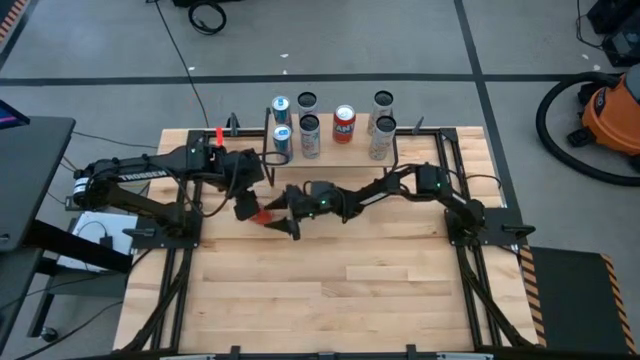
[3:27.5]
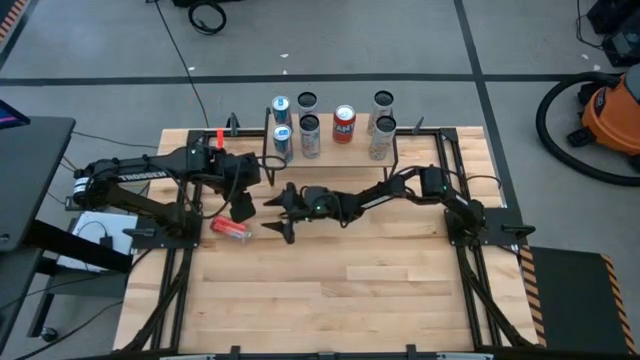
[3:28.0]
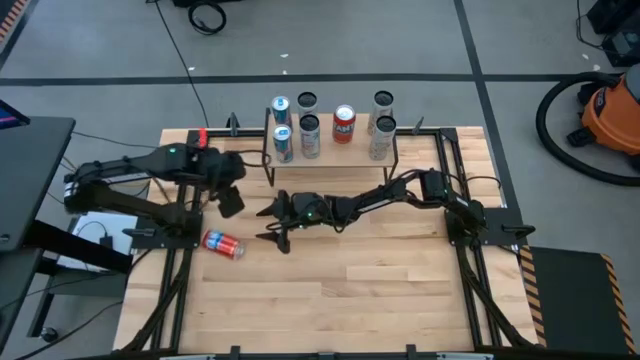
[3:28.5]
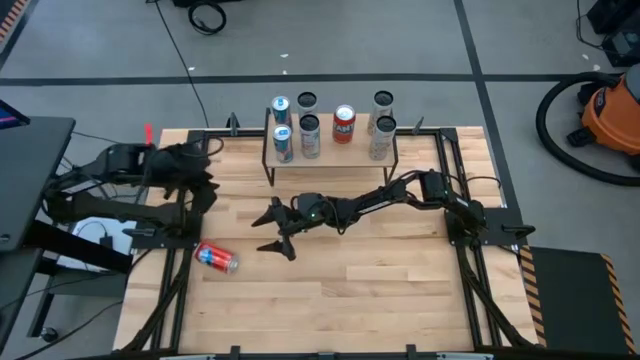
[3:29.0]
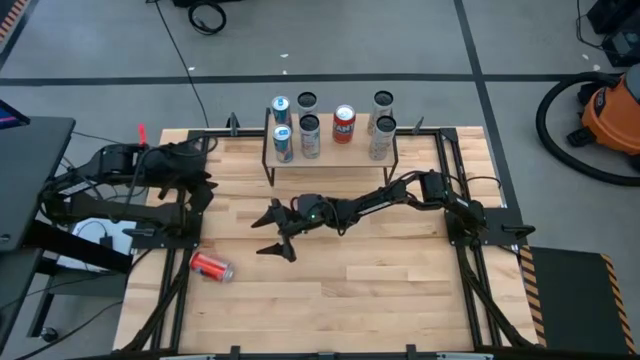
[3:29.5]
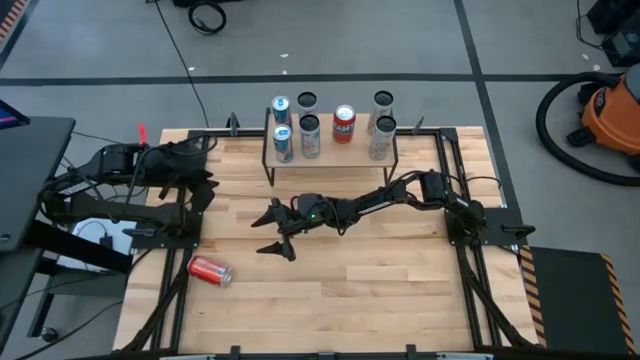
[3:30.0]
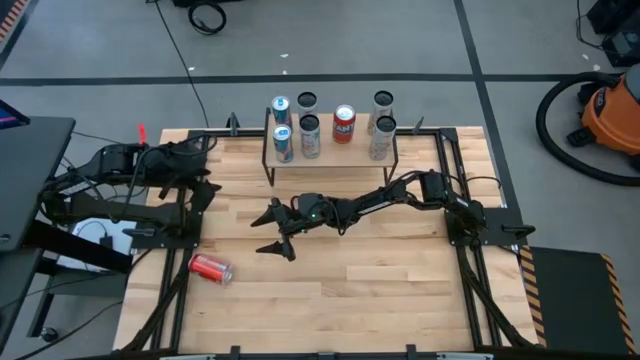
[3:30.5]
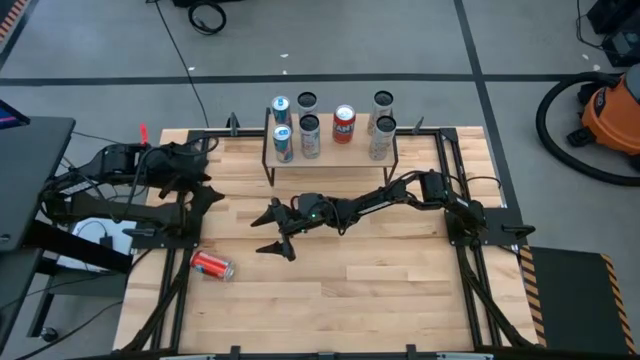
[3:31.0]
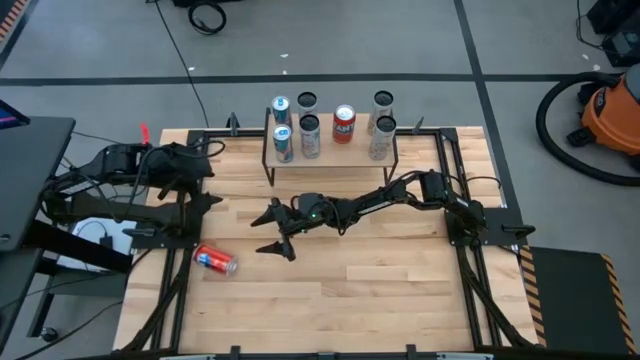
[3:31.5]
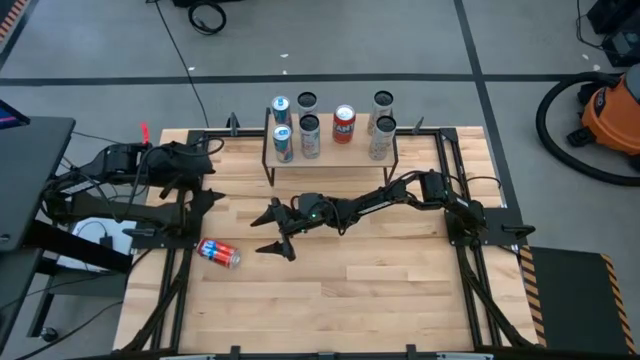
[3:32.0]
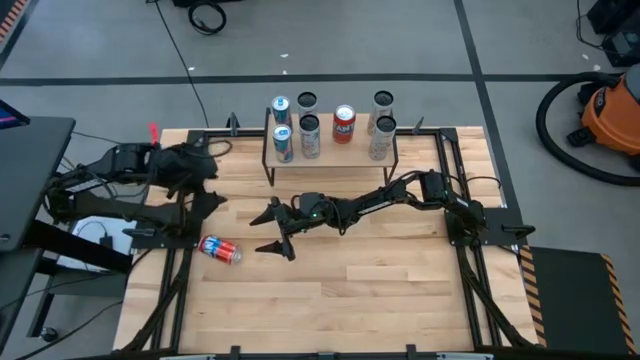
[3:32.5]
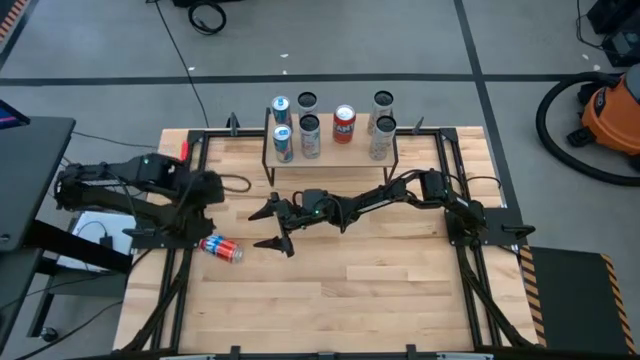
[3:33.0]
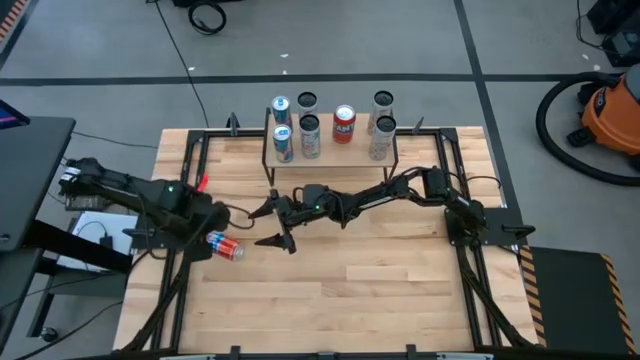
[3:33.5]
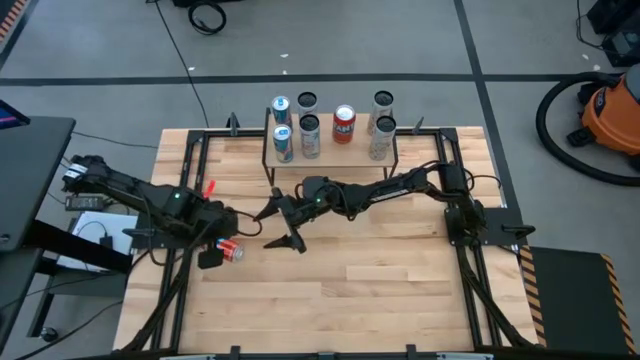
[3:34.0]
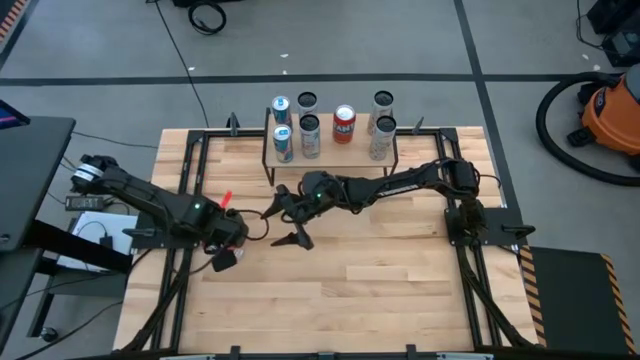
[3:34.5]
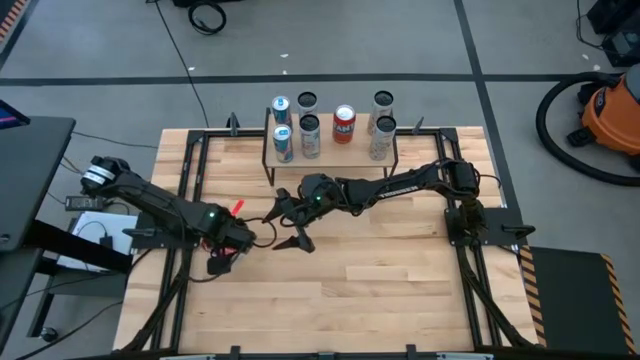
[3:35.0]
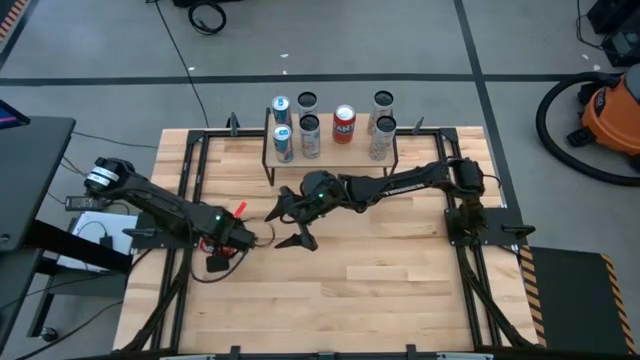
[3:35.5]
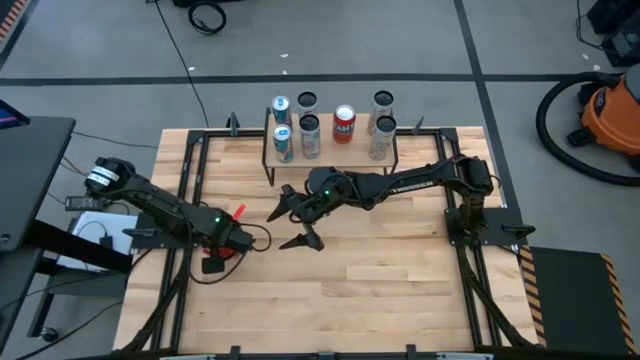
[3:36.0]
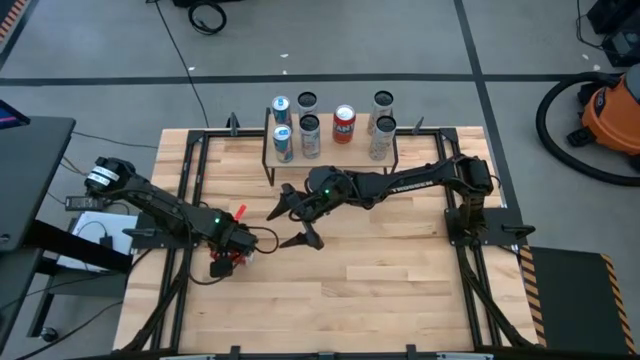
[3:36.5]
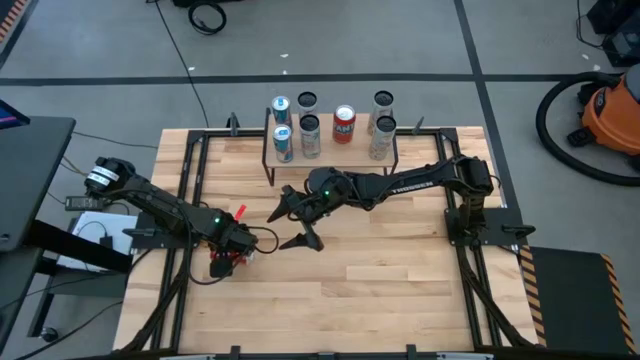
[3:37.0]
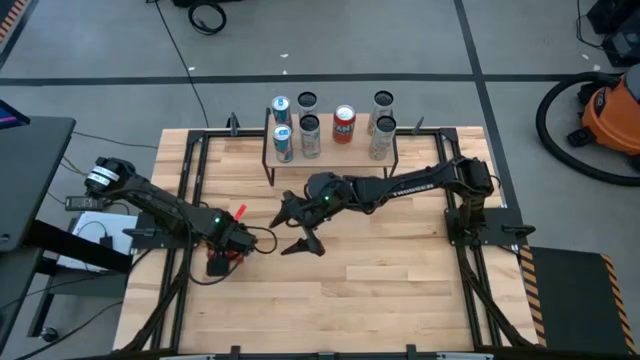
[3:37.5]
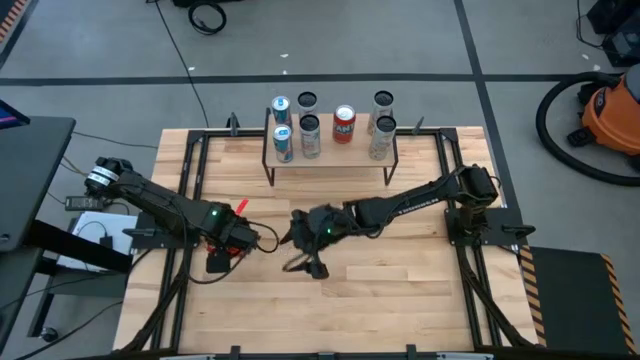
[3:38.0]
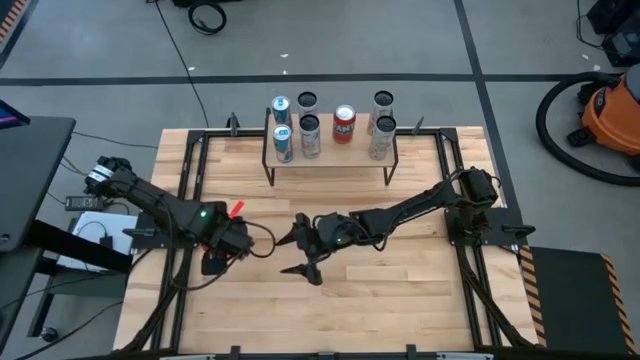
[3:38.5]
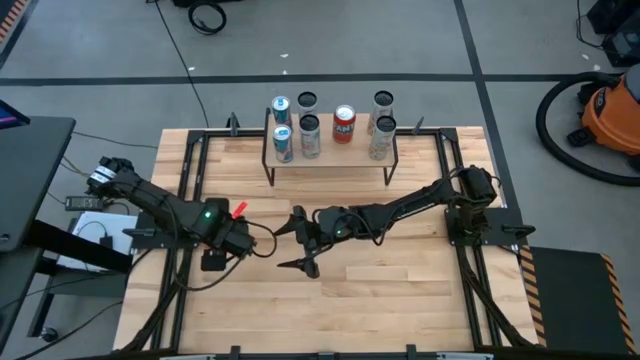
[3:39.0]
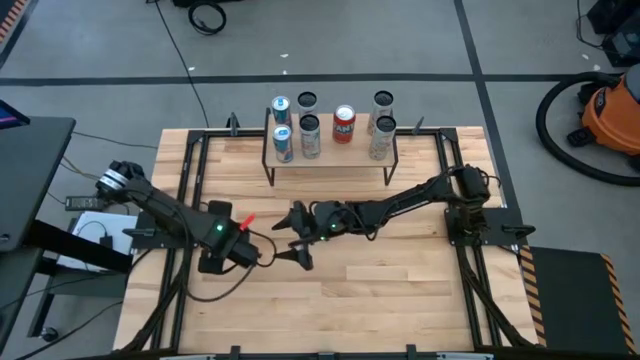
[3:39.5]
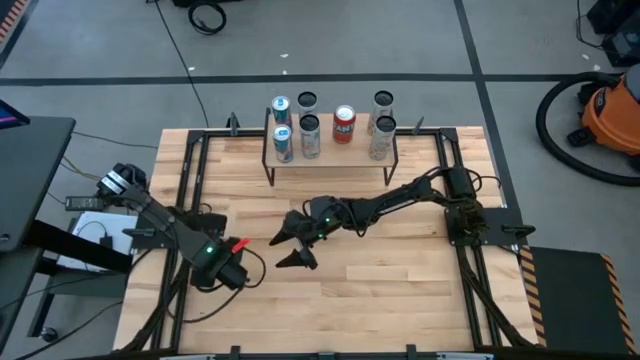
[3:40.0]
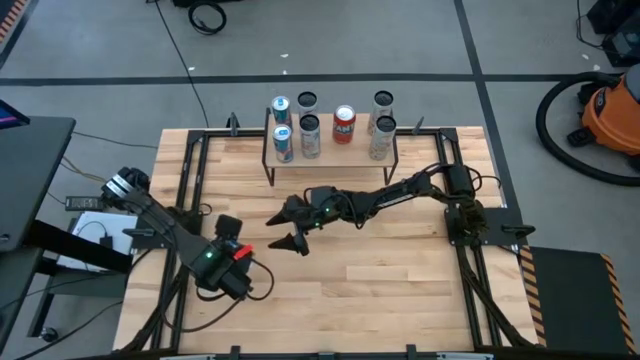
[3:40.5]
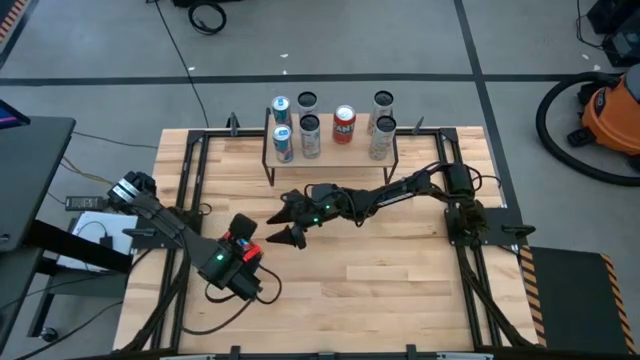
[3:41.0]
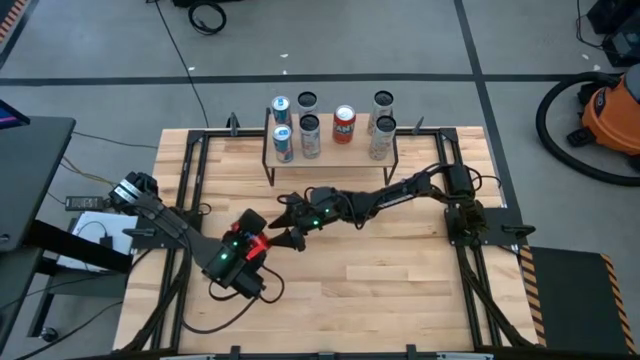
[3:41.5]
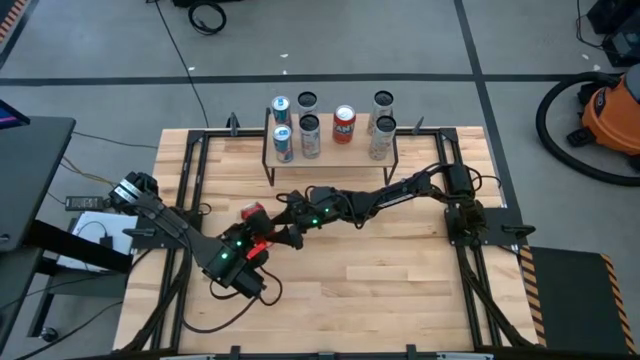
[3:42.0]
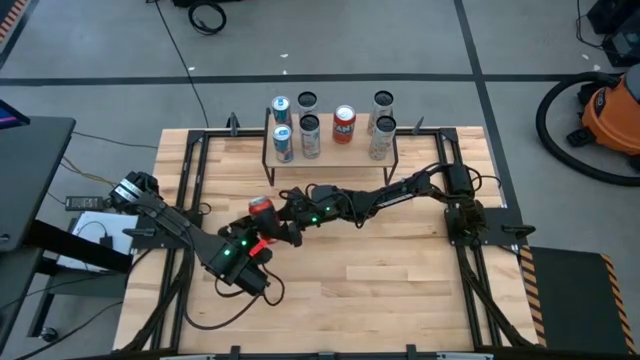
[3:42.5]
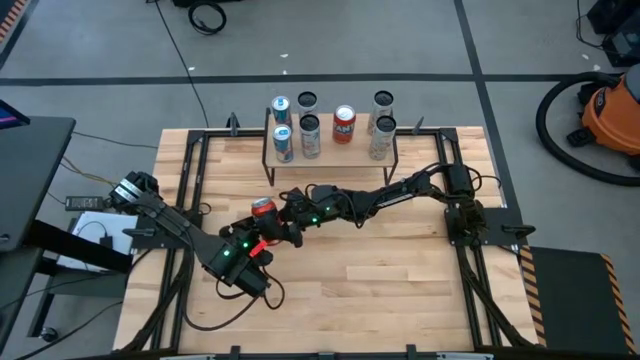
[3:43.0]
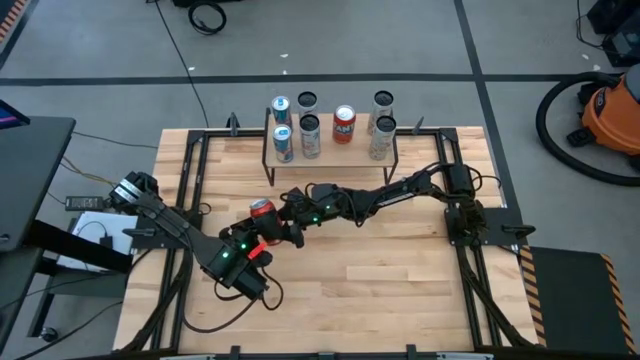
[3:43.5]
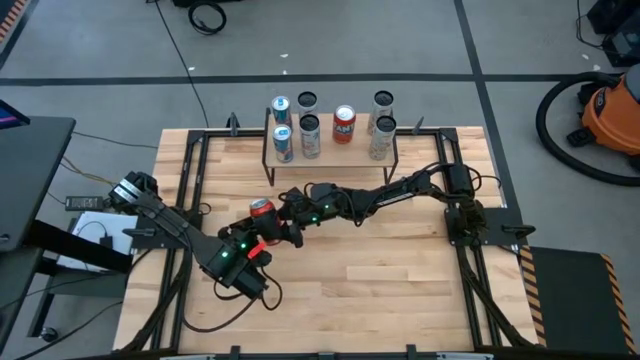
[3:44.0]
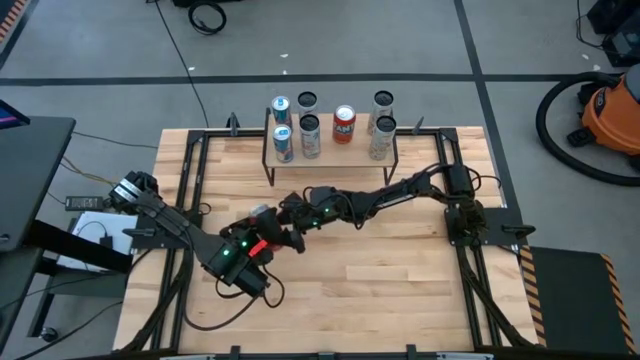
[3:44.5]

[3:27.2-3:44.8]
Task: Place canned beverage on shelf
Put the orange soda can on the shelf

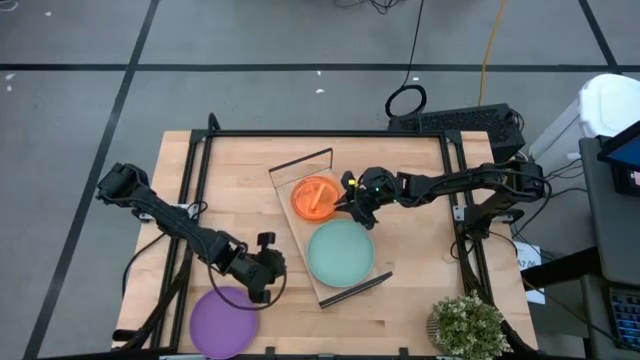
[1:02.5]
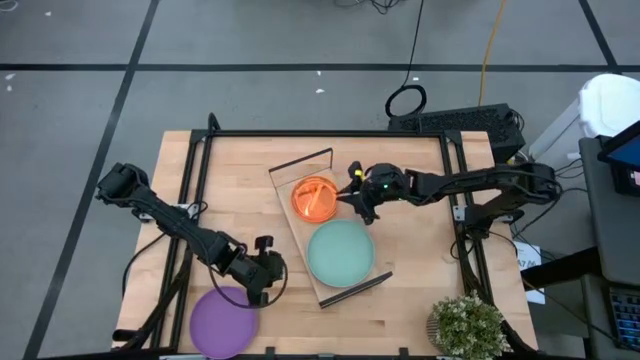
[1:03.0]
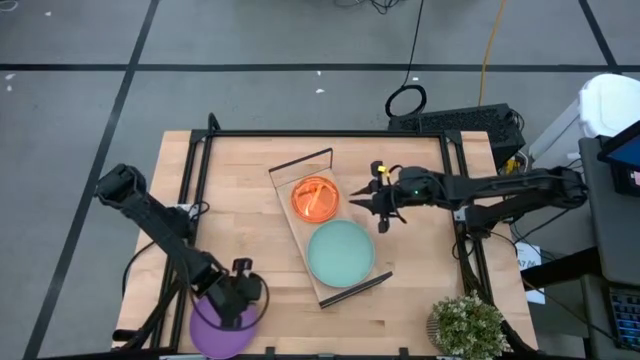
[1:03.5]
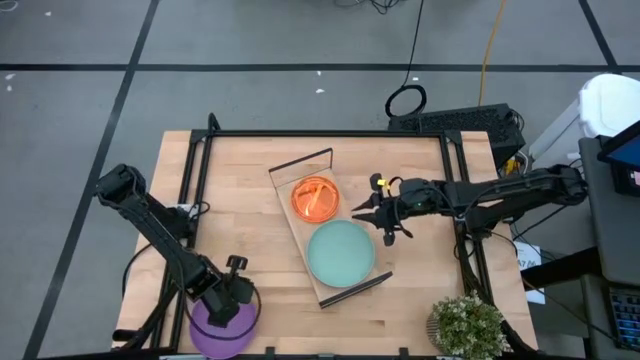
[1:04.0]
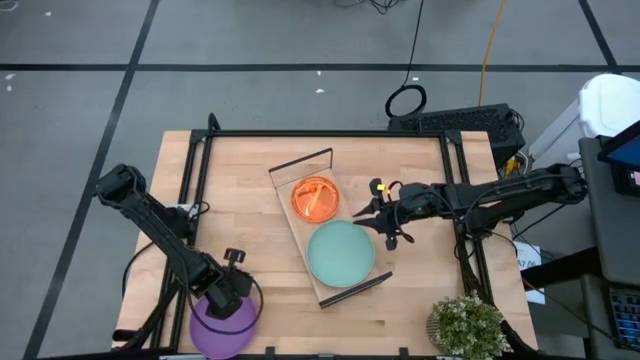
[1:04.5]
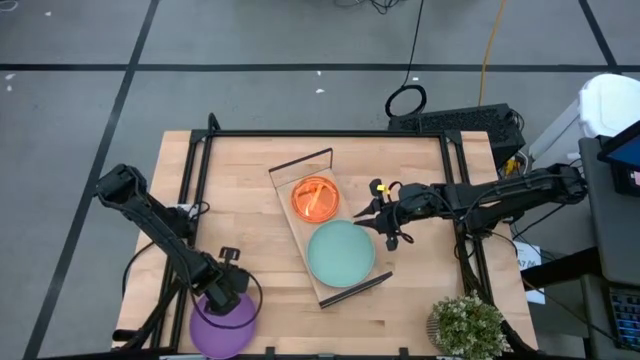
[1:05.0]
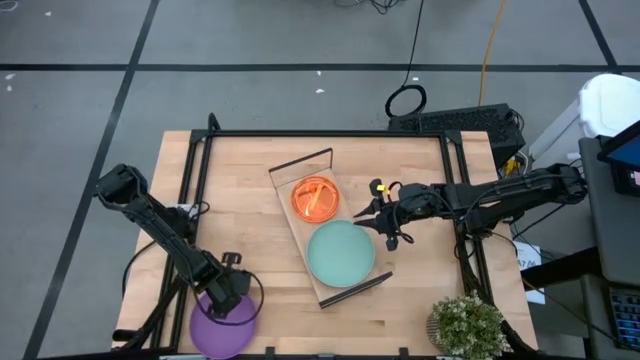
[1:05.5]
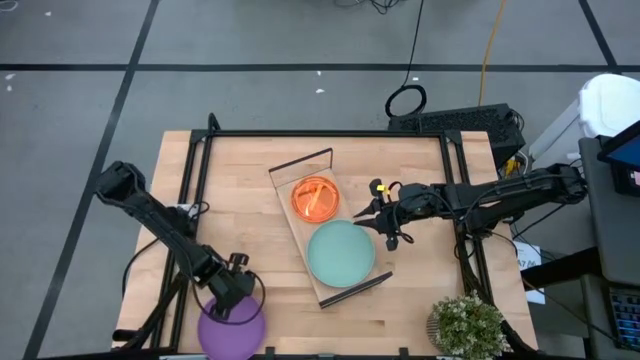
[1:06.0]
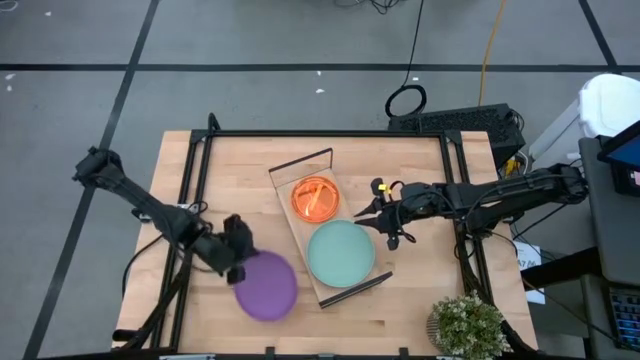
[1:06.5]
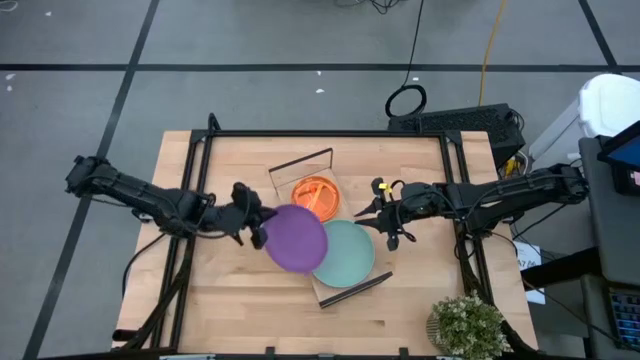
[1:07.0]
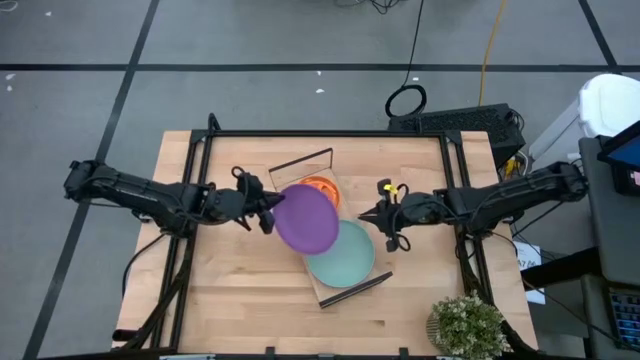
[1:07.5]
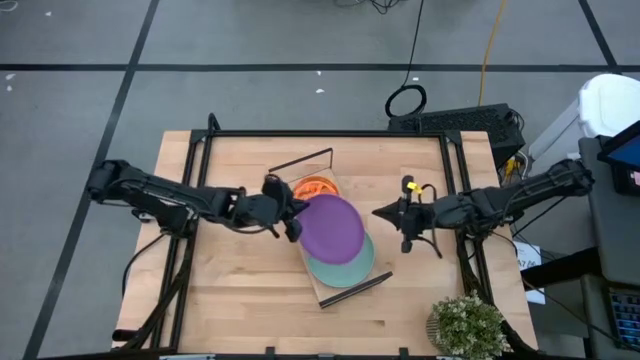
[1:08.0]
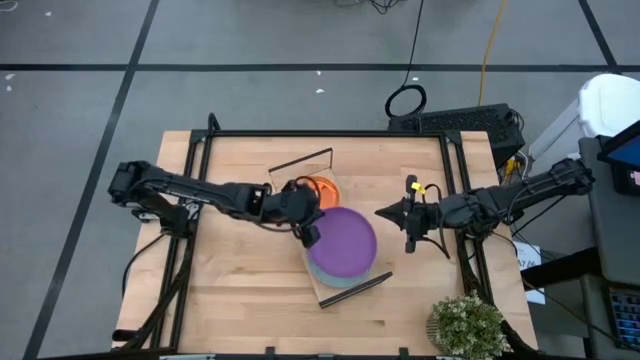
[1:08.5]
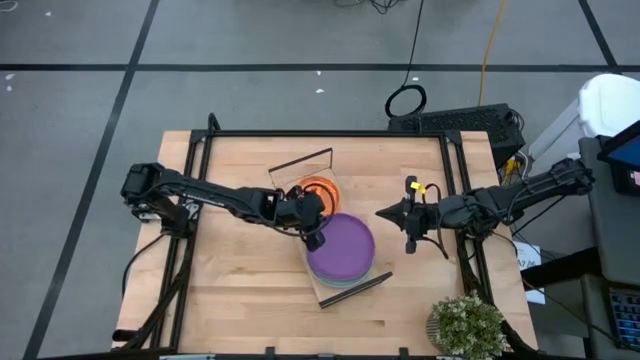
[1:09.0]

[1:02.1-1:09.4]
Task: Place and stack plates onto a shelf
Stack the purple plate on the gray plate on the shelf
